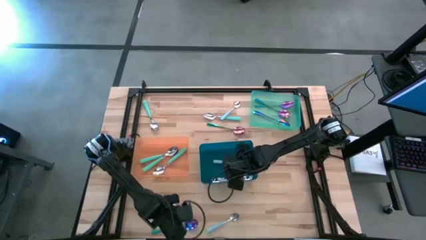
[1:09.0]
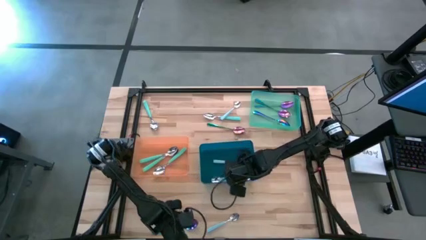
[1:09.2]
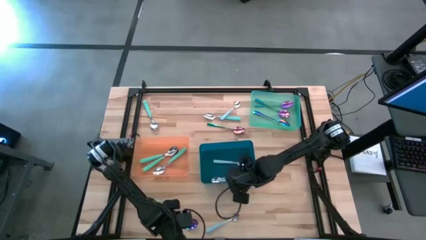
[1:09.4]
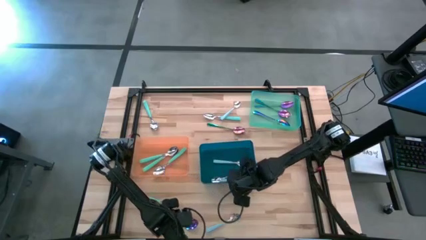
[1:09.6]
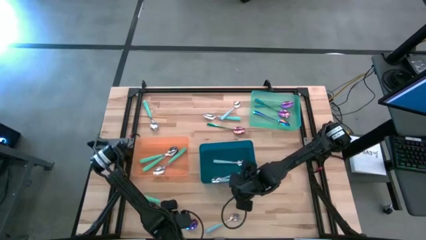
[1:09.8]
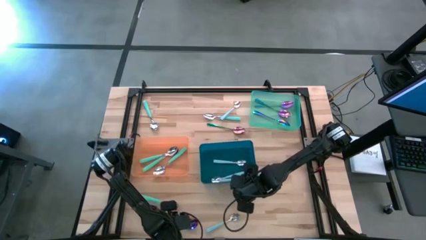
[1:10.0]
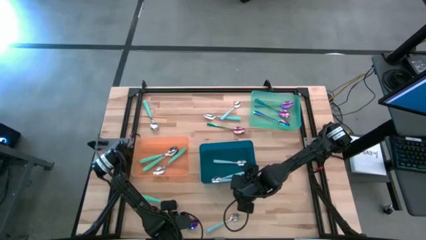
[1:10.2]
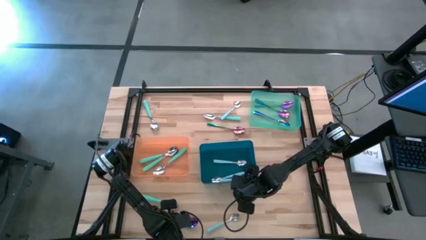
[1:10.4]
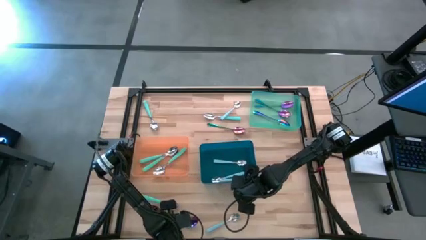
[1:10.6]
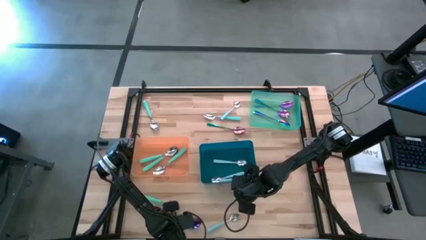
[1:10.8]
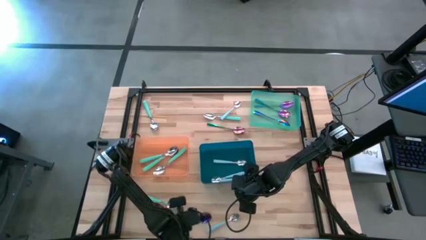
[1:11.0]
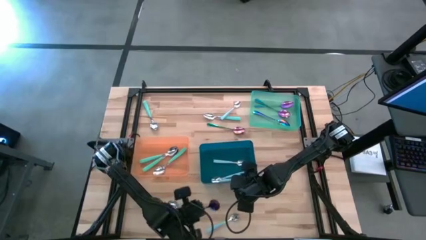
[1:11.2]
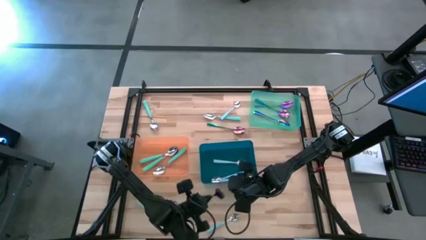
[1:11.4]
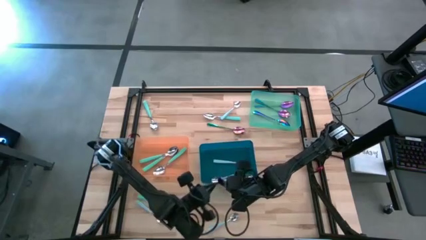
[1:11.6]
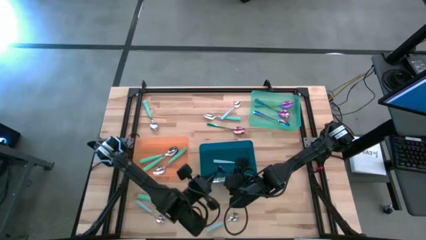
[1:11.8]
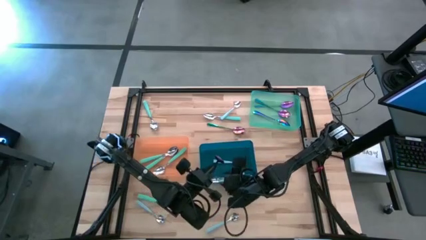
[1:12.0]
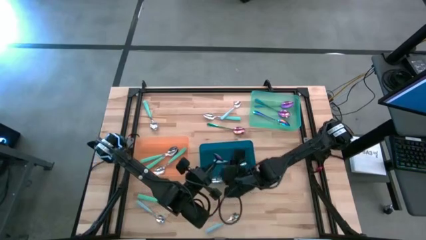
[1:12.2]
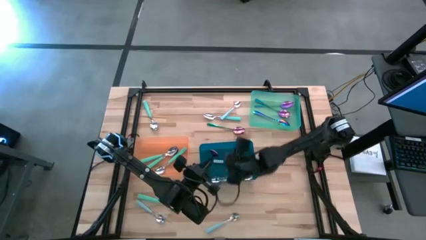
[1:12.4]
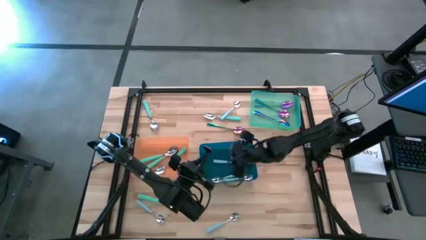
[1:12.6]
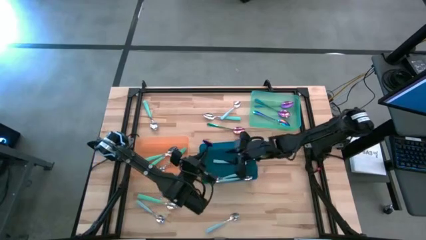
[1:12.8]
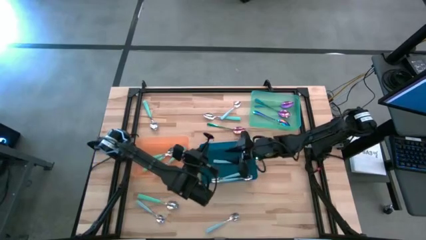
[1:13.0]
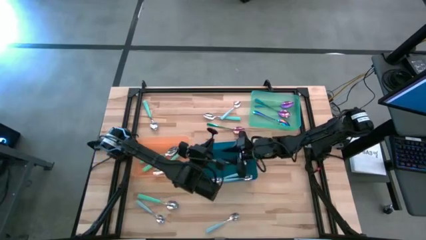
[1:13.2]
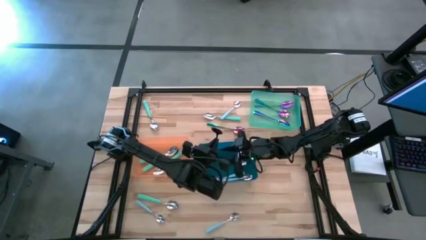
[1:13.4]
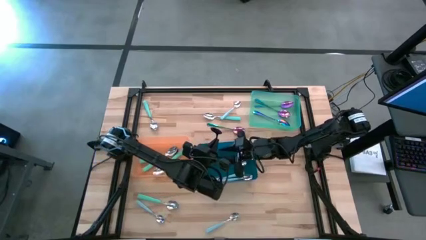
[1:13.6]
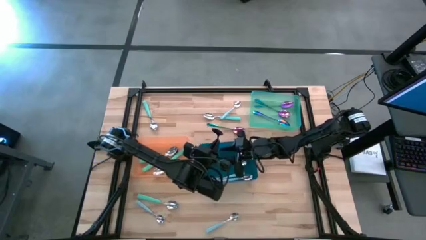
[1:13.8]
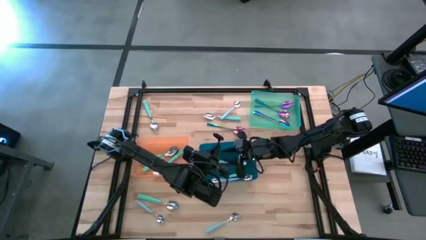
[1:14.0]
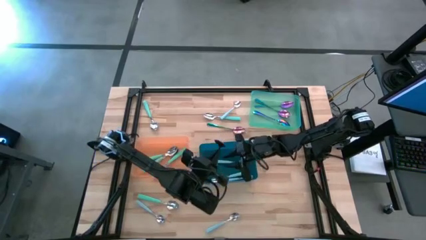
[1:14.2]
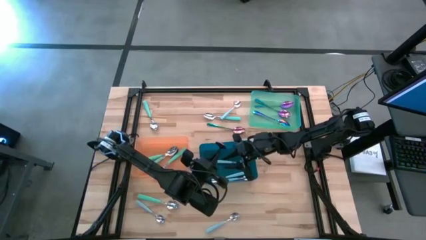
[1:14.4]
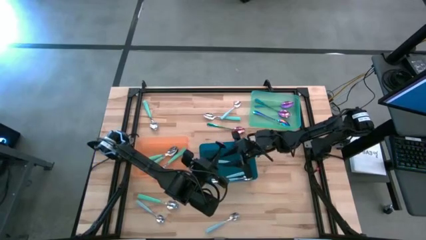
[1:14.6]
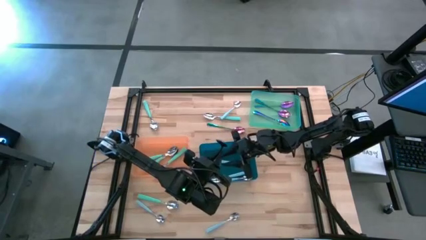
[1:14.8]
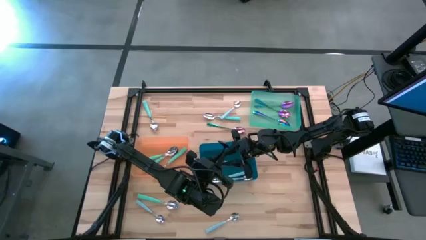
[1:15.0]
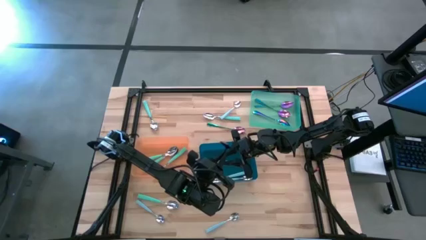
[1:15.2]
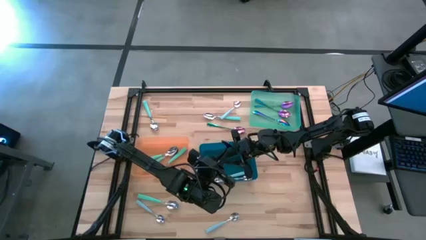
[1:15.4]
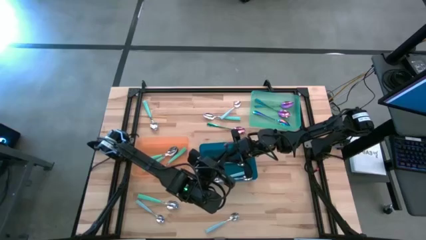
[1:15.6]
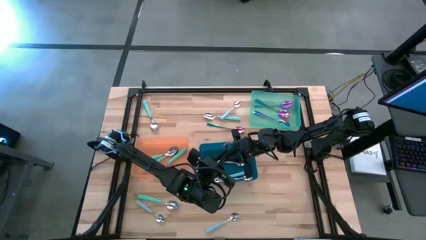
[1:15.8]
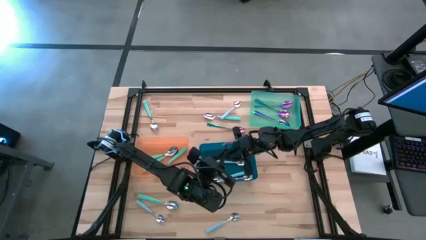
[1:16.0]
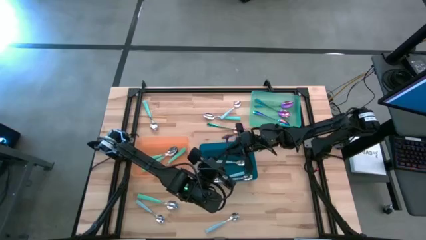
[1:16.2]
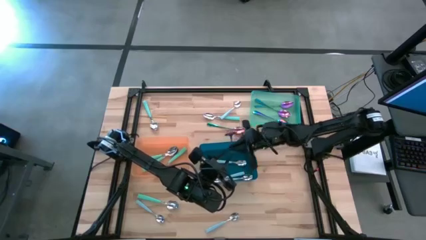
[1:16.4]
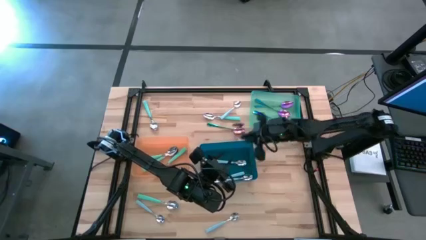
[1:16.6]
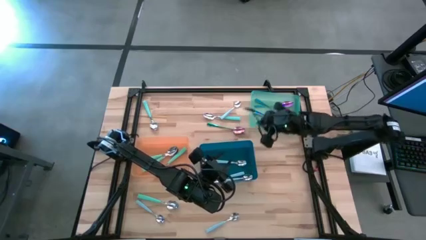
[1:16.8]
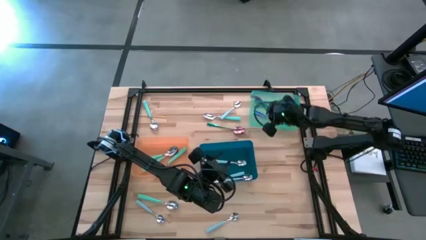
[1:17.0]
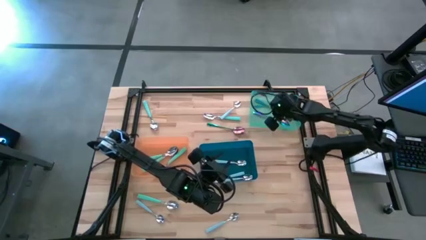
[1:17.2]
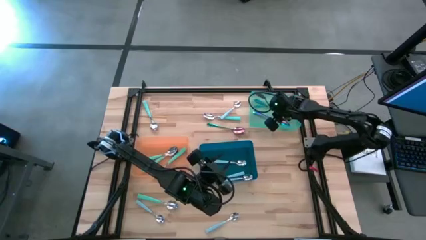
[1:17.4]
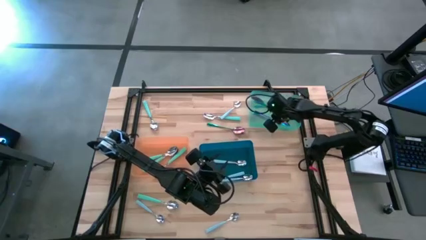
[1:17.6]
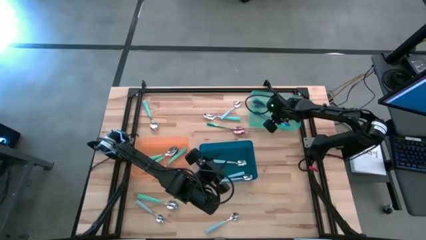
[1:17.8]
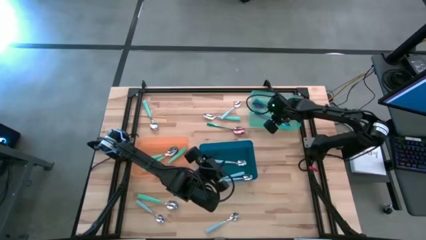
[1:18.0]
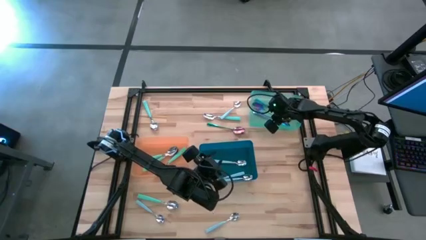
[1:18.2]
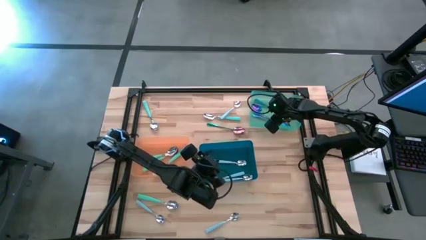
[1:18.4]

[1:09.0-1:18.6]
Task: Sort silverware by color (type)
Put the blue spoon into the green bin

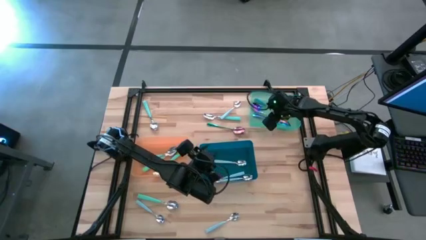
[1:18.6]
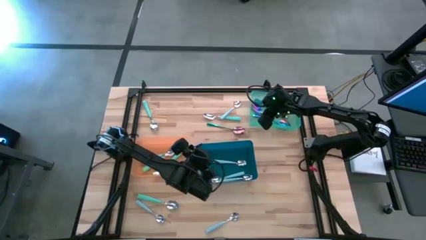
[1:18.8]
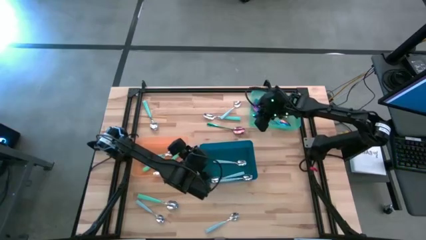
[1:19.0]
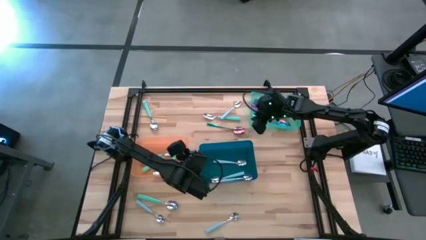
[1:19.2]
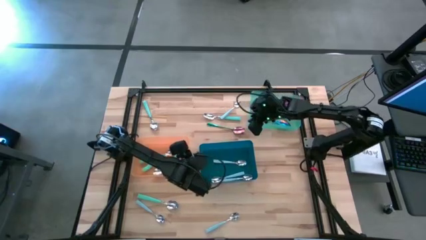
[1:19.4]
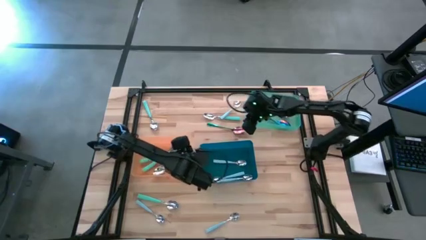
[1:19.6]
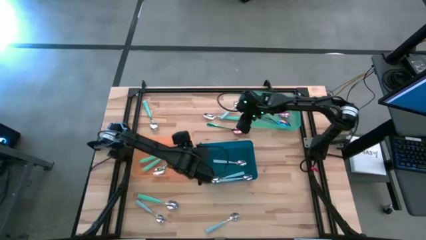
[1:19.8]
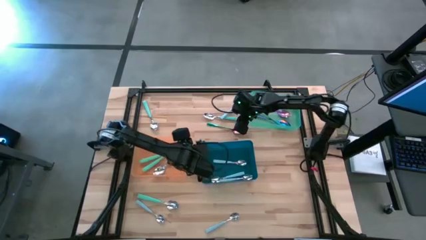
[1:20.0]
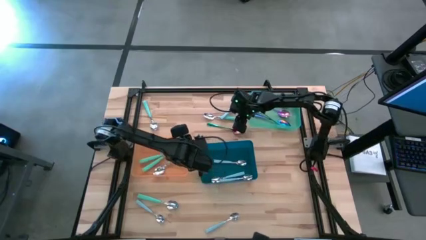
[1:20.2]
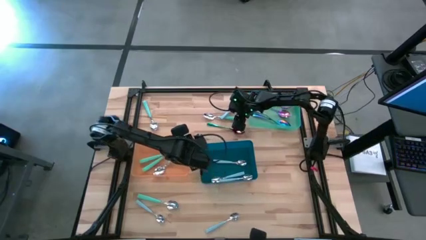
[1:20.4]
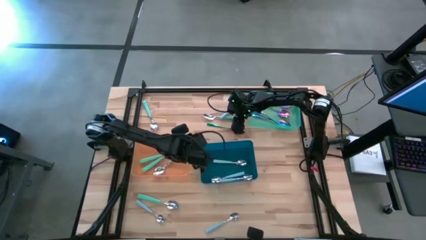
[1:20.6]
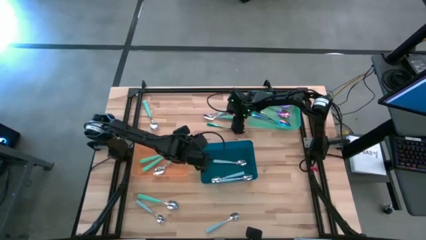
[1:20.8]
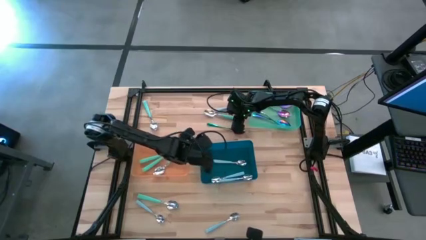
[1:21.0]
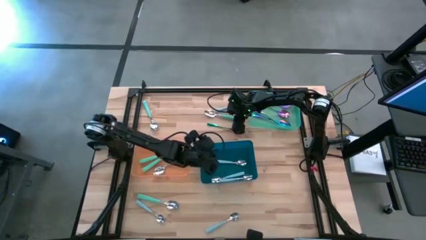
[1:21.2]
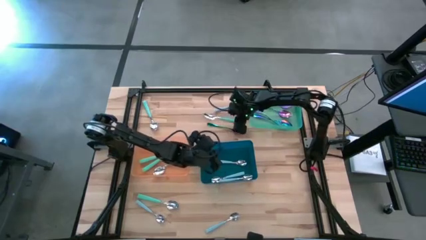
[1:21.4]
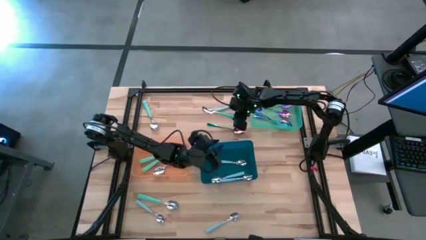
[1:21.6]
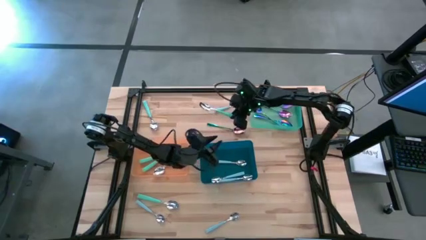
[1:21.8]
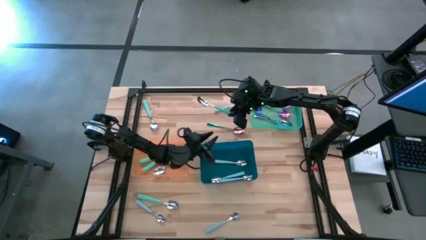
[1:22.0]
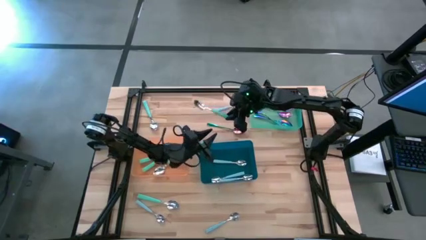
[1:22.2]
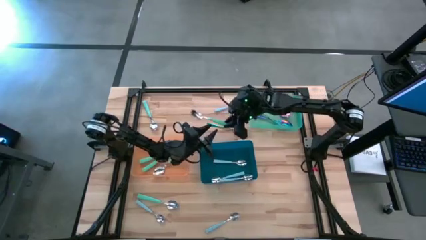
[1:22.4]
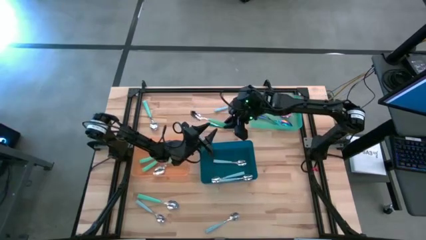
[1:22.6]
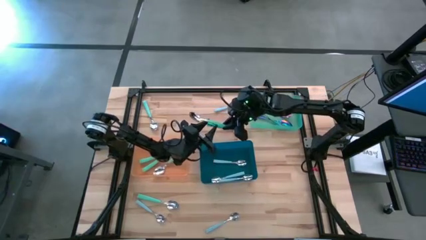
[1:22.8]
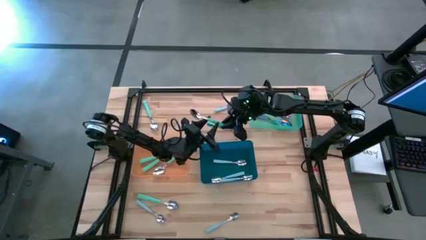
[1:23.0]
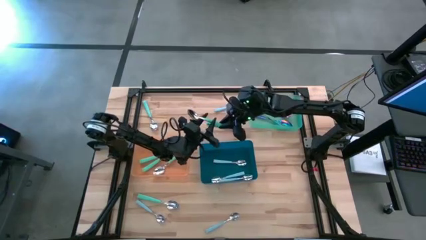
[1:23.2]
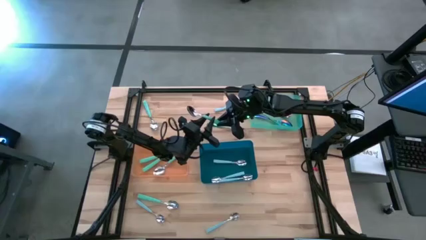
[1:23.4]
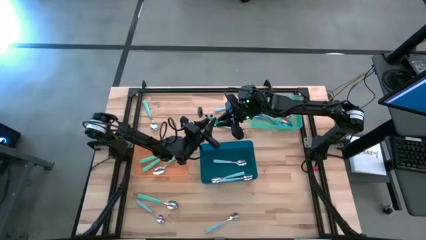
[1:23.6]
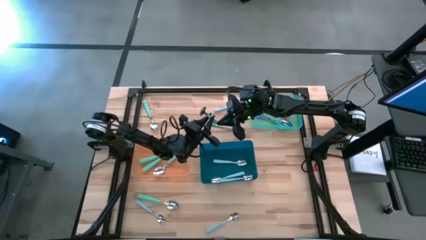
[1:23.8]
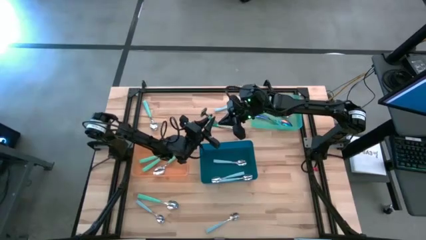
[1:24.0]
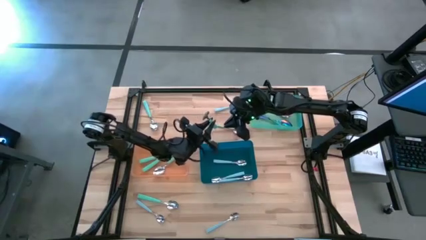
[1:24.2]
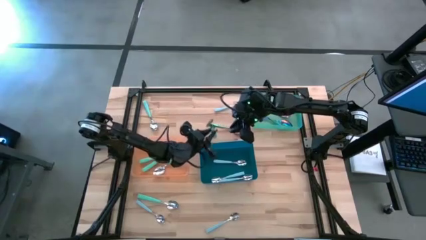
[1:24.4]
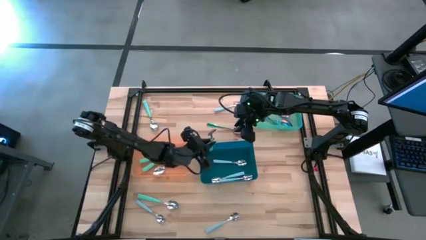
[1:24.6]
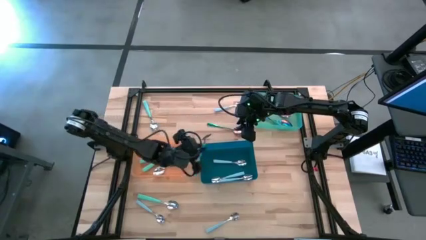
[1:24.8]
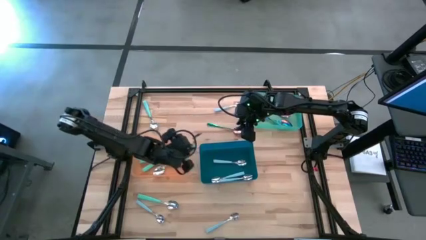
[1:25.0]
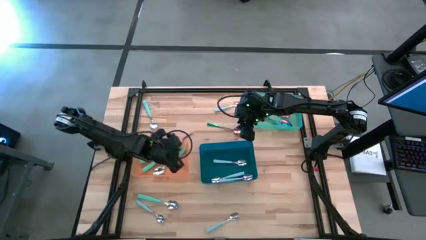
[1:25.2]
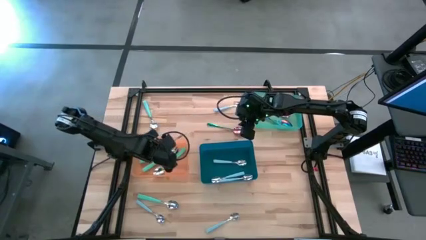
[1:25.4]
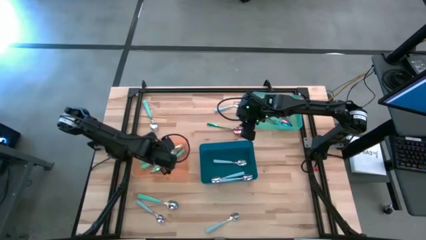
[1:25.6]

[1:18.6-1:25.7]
Put the light green spoon into the orange bin
